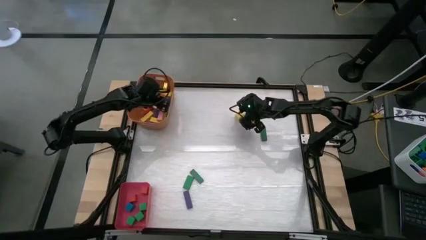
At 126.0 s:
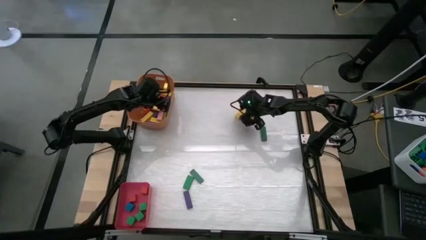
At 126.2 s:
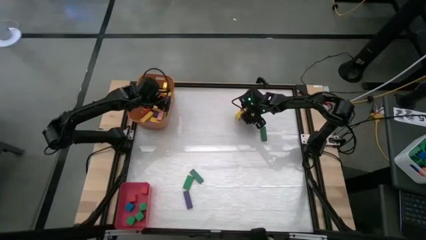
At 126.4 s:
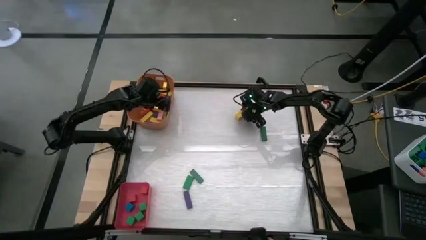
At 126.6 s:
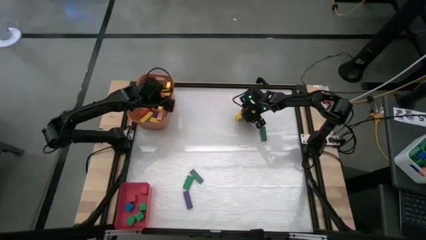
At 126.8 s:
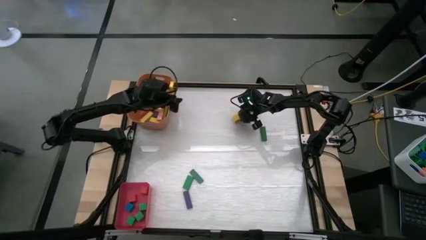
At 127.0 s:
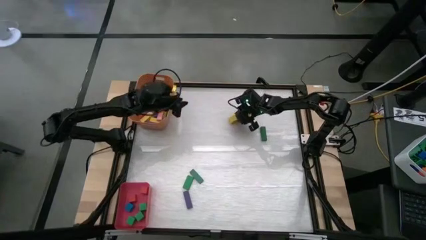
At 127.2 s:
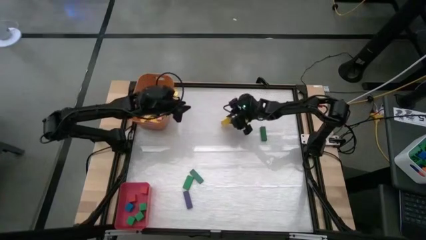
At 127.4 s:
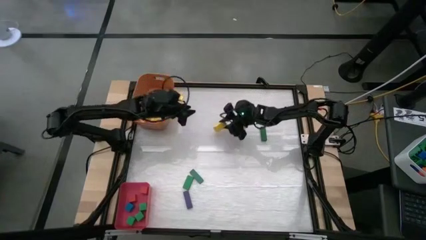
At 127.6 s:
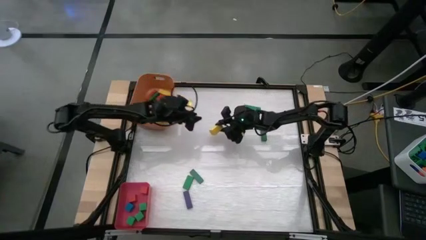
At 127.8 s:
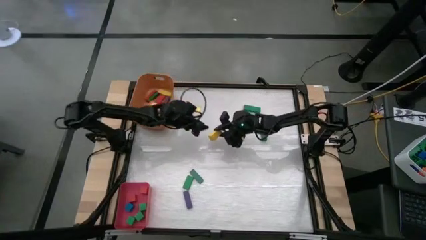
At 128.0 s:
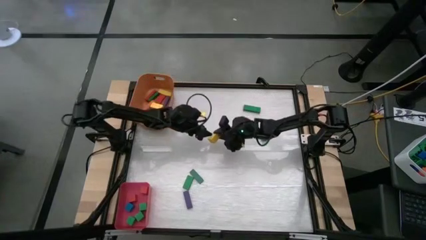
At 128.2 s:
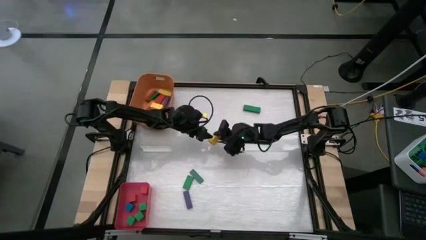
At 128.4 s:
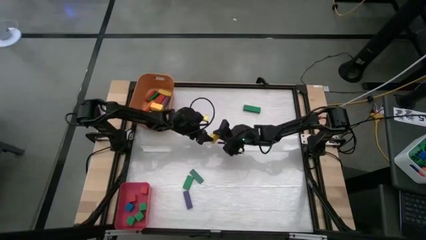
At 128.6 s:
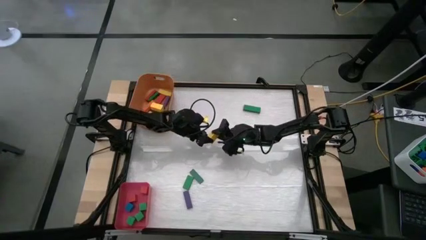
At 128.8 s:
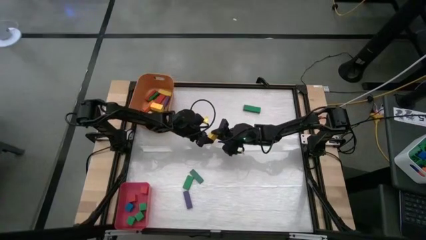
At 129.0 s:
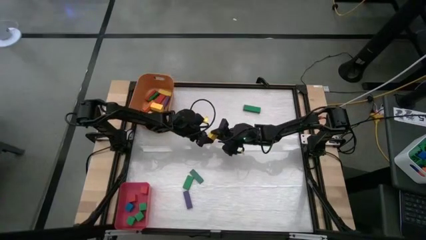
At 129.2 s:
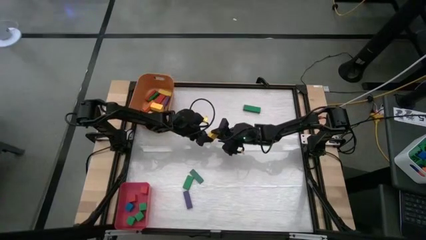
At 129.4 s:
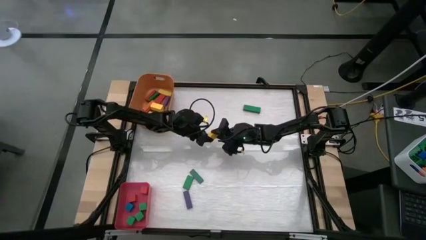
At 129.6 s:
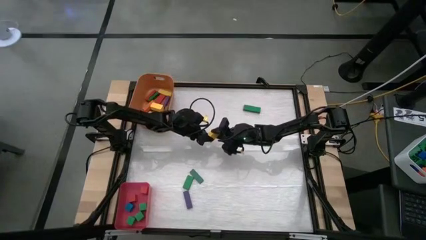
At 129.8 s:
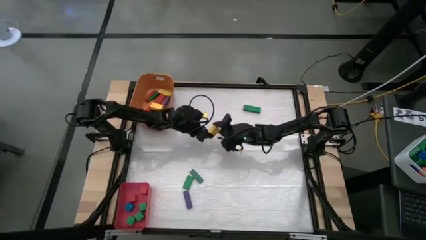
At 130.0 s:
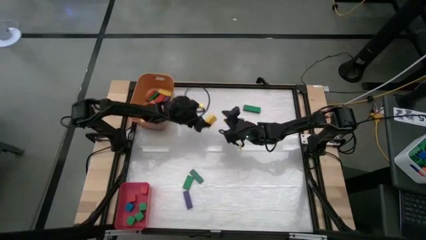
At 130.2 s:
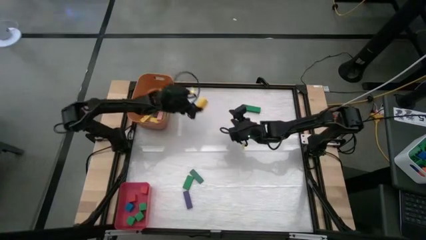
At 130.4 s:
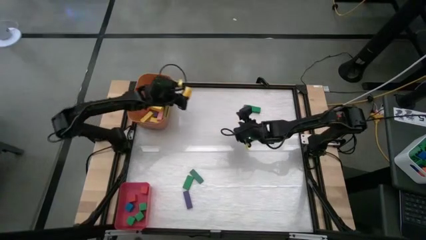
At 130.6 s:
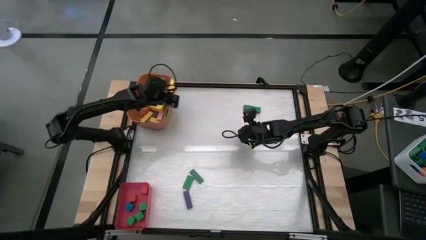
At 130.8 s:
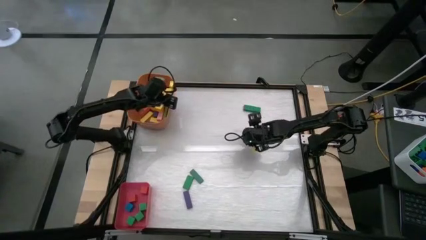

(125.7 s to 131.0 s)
Task: Sort blocks by size
Put the big yellow block into the orange bin

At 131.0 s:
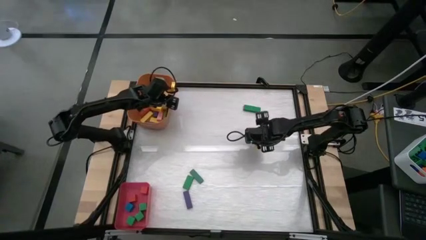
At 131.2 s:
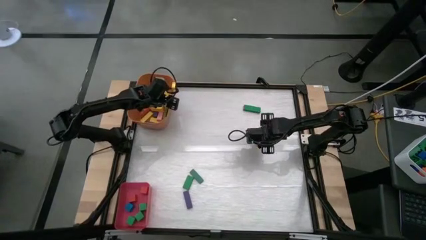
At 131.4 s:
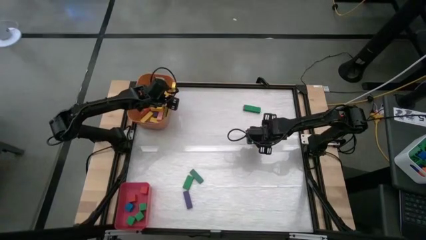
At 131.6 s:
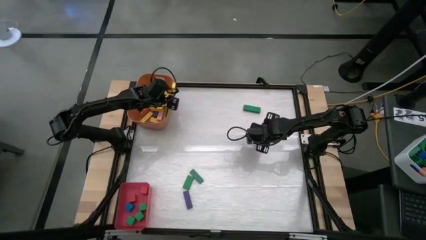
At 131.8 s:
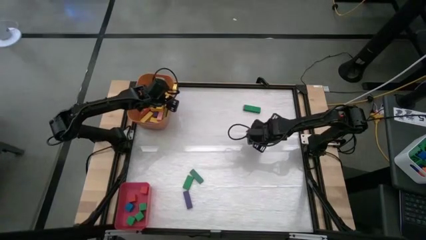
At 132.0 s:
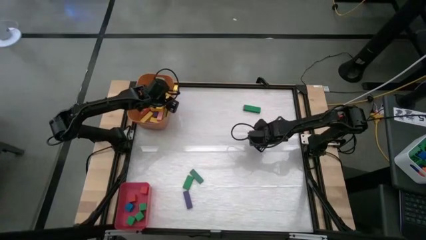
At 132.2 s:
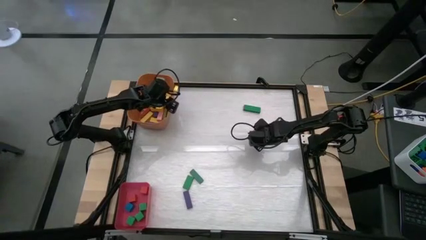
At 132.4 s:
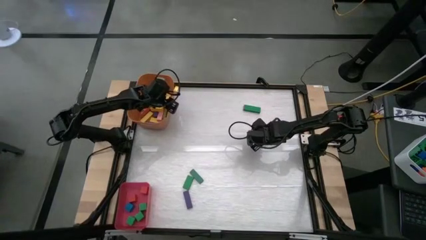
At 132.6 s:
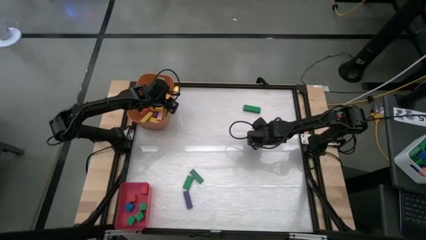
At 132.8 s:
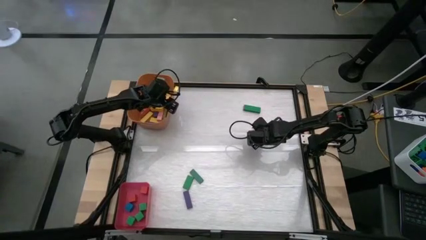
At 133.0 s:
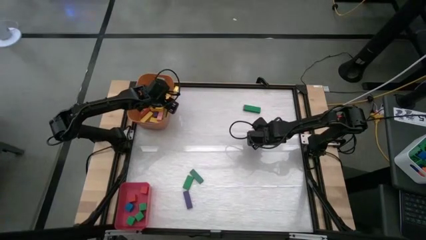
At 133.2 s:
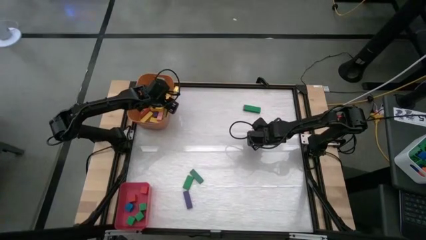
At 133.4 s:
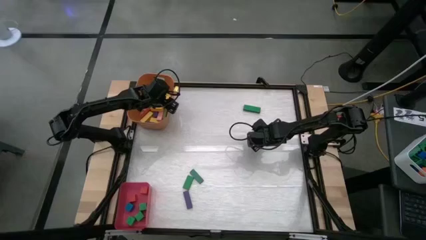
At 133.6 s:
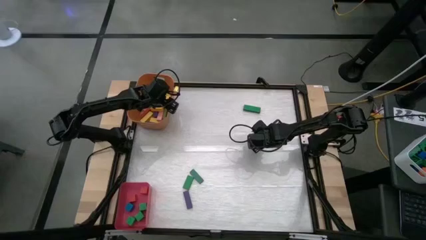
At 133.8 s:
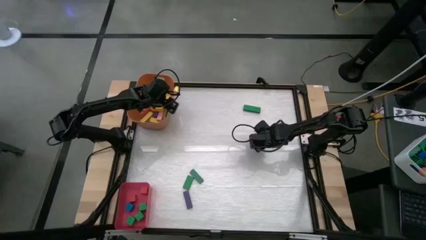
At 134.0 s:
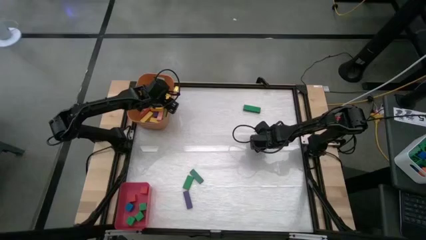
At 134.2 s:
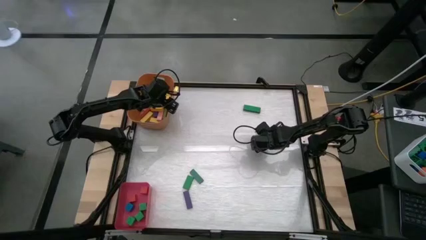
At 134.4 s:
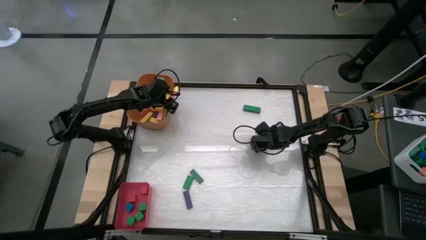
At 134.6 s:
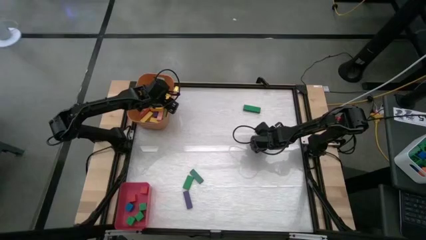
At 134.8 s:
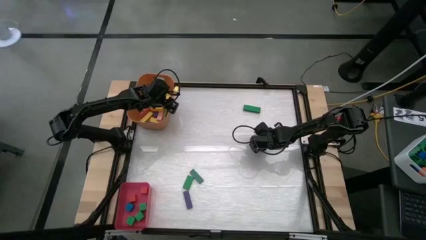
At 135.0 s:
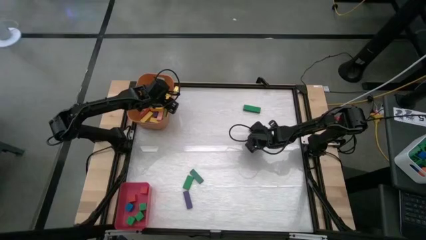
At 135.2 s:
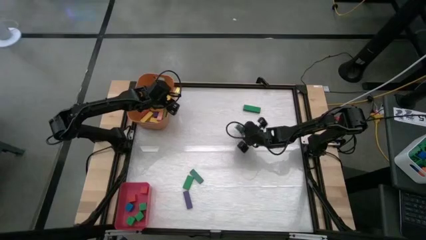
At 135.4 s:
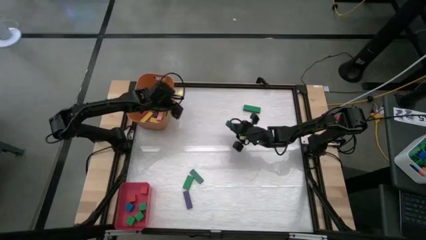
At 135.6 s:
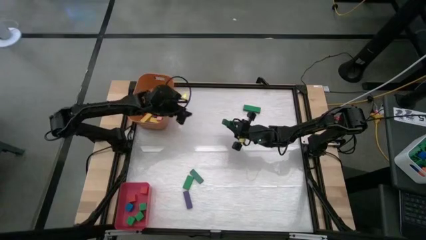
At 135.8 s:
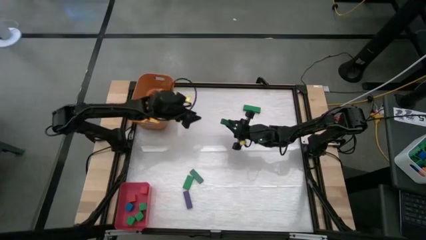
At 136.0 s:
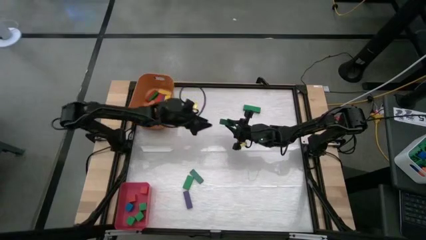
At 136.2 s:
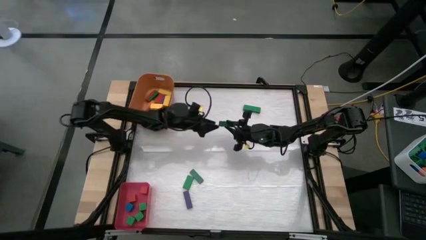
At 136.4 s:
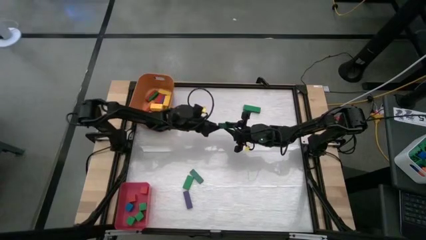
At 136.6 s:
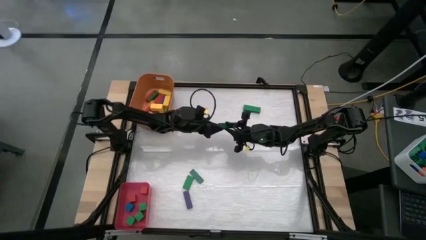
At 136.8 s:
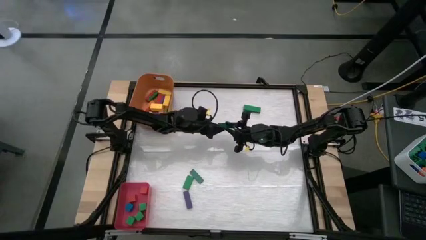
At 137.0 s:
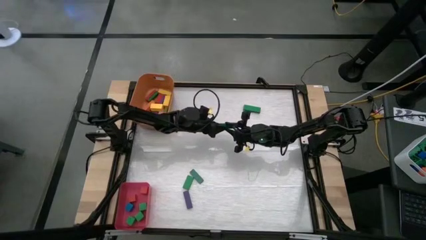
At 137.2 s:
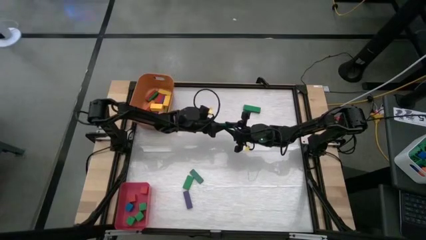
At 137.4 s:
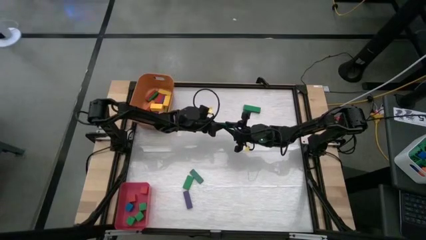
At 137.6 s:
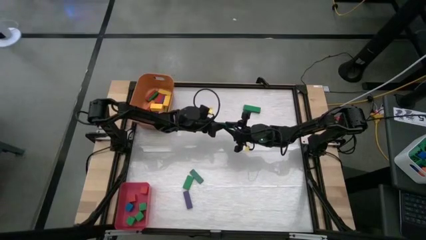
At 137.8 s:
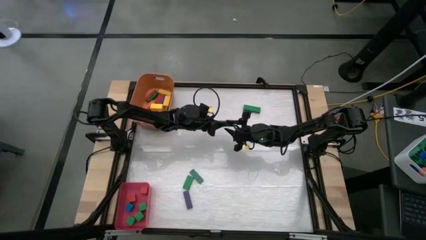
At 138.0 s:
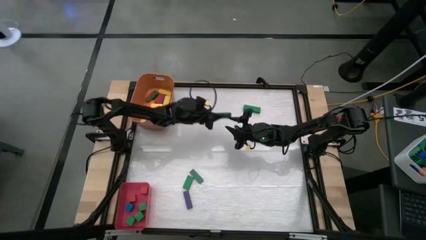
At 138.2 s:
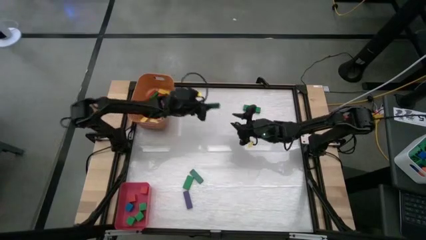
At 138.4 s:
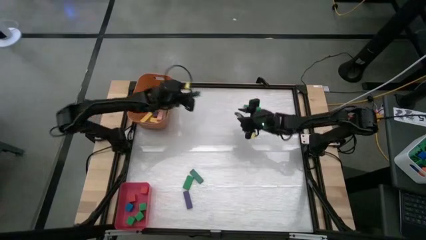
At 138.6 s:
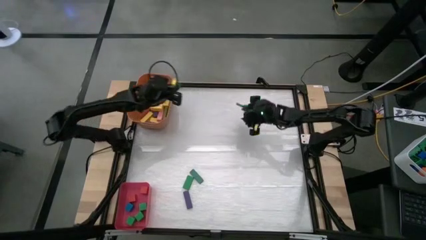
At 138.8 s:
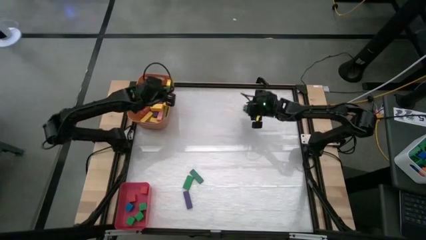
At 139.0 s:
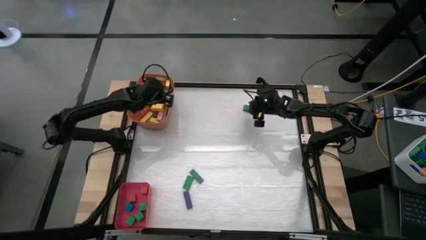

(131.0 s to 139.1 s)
Put the big green block into the orange bin

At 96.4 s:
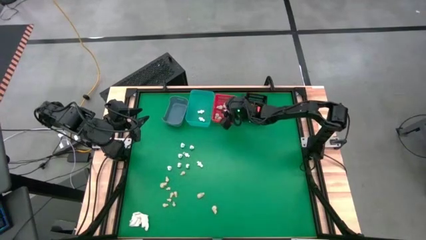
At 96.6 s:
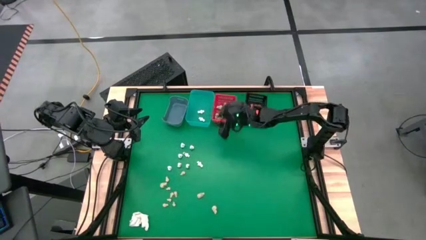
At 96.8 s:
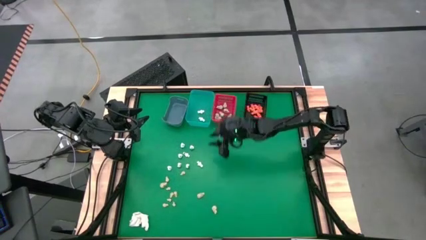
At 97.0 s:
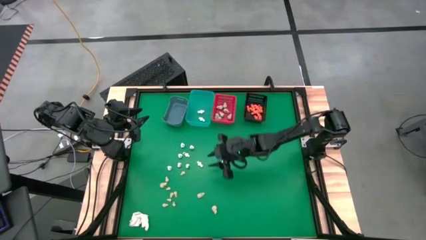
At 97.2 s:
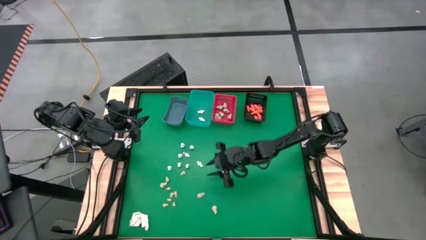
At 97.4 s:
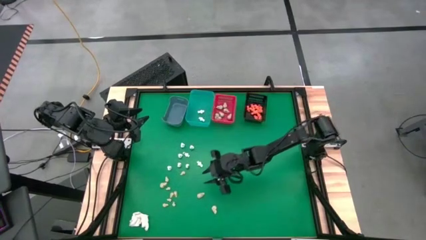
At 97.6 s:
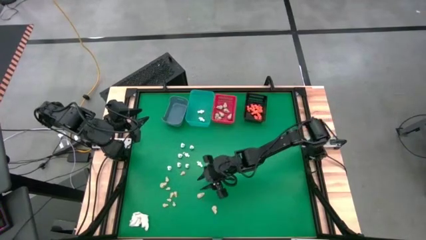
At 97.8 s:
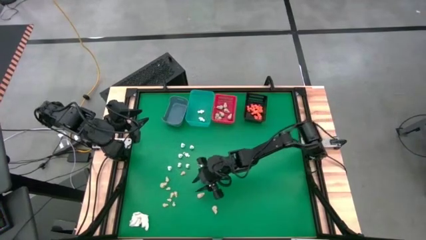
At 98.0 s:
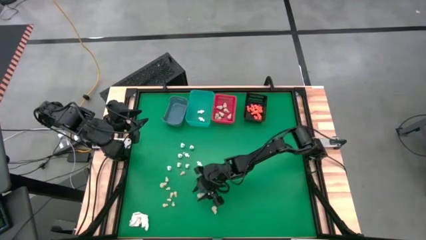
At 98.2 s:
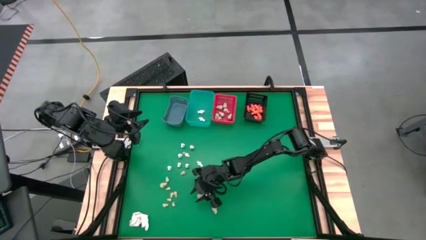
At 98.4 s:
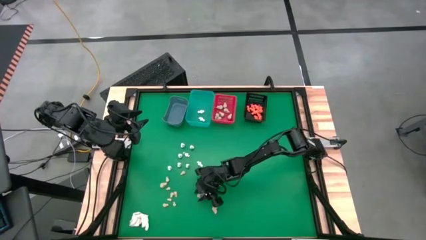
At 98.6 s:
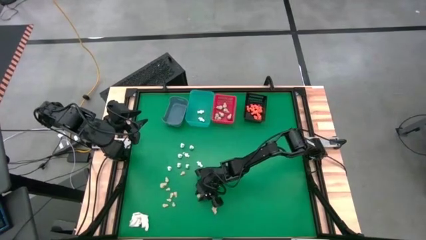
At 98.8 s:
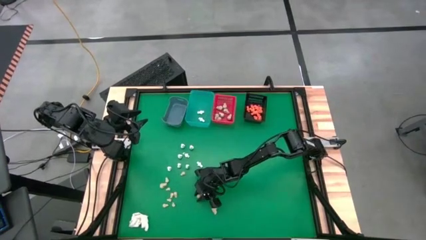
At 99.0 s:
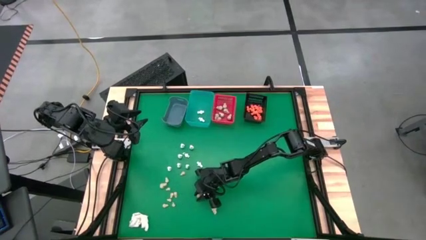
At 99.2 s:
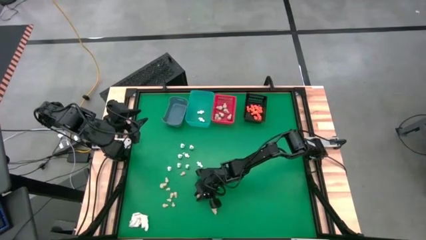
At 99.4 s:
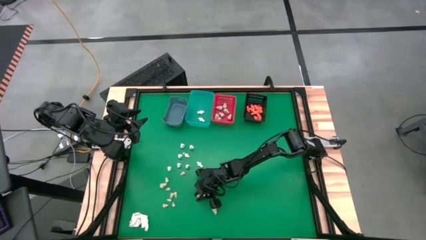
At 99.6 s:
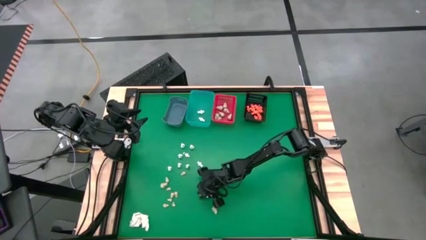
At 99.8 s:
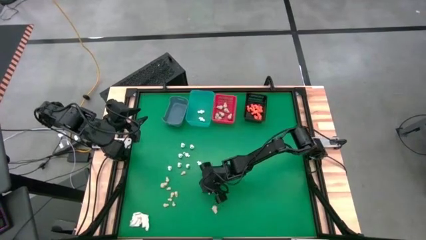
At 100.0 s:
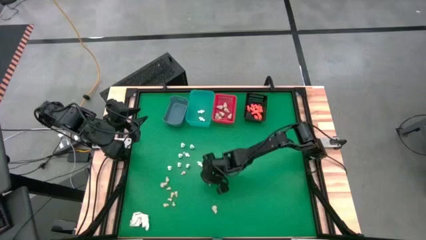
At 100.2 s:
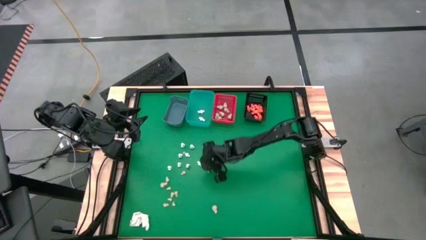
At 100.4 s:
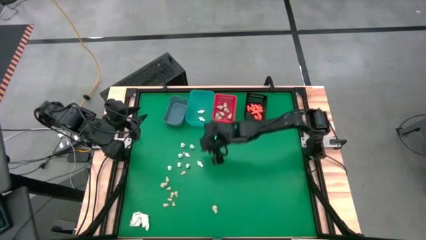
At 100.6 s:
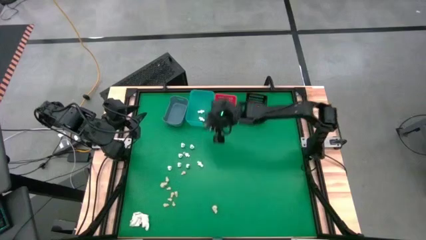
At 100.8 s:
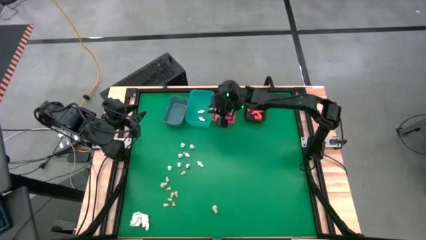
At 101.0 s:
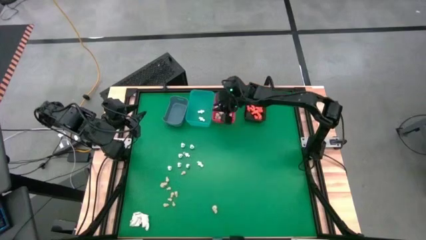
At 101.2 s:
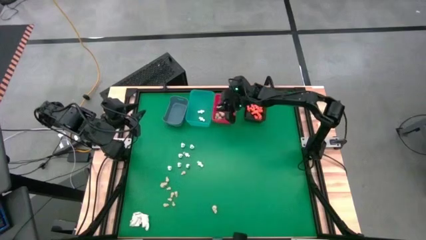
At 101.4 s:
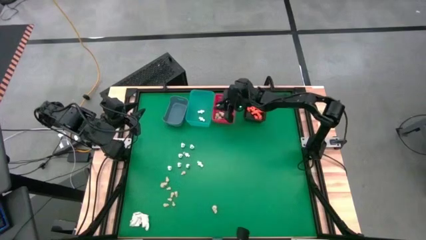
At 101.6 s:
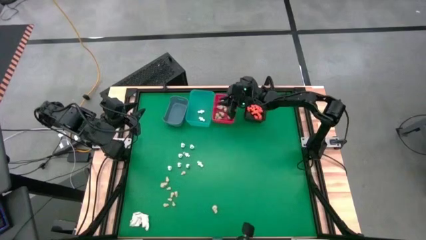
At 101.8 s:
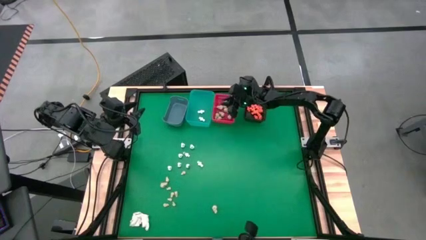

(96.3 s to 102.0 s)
Task: Sort Halloween decoration
Put the white skull toy into the red bin
